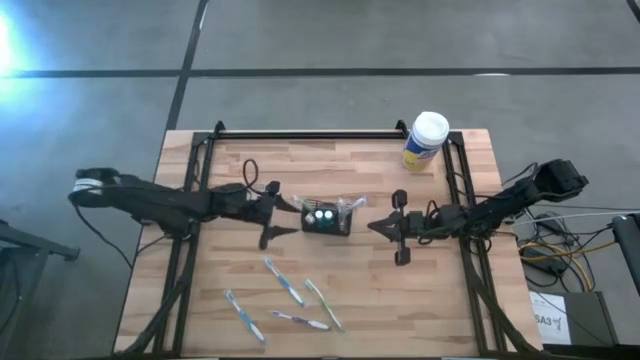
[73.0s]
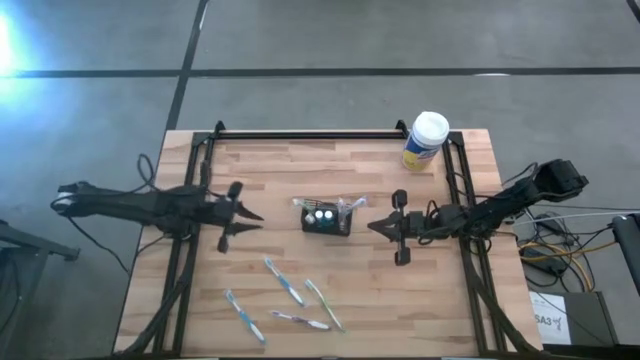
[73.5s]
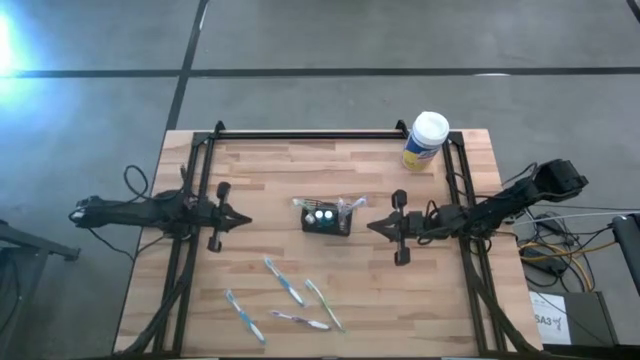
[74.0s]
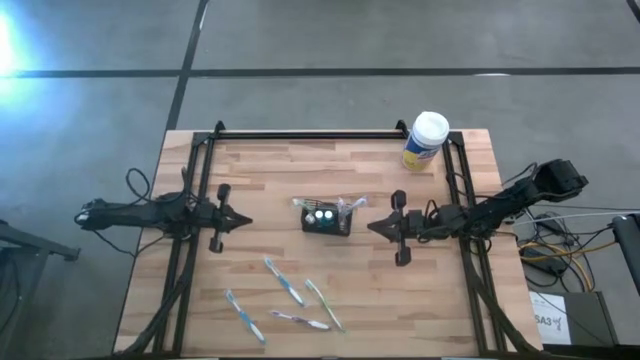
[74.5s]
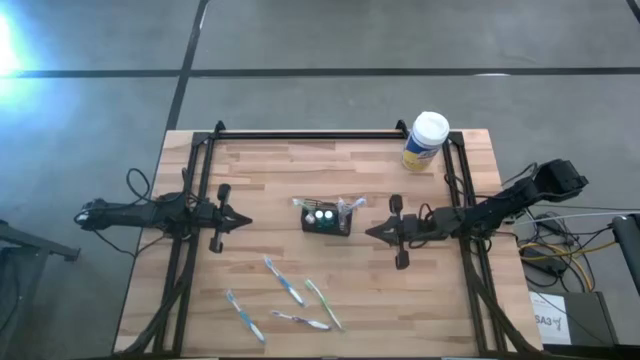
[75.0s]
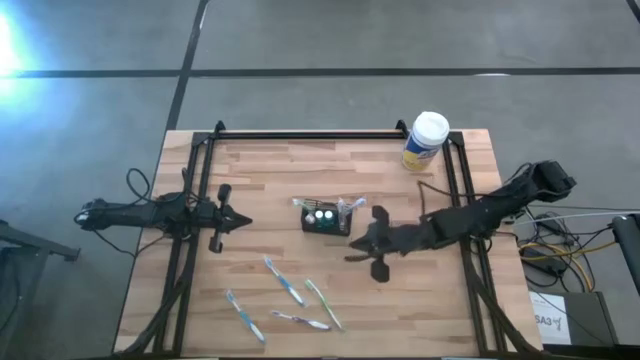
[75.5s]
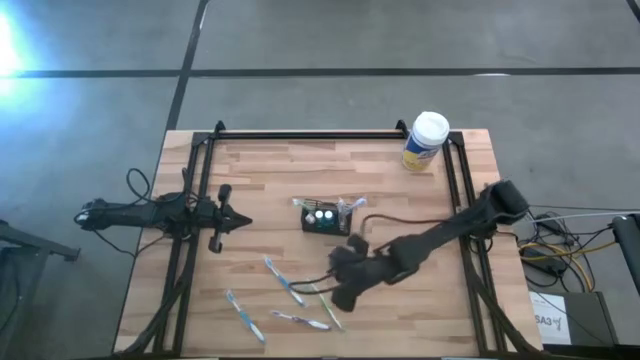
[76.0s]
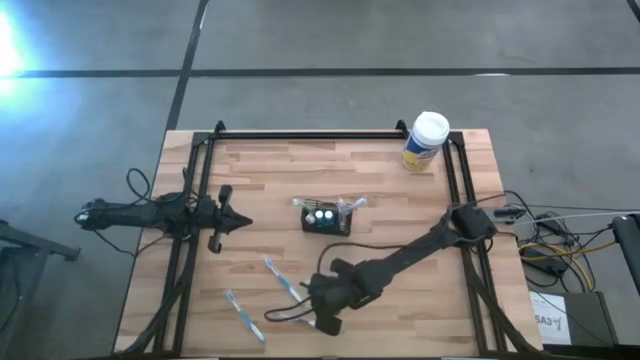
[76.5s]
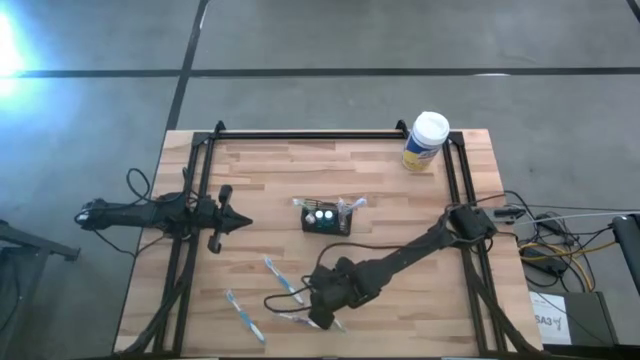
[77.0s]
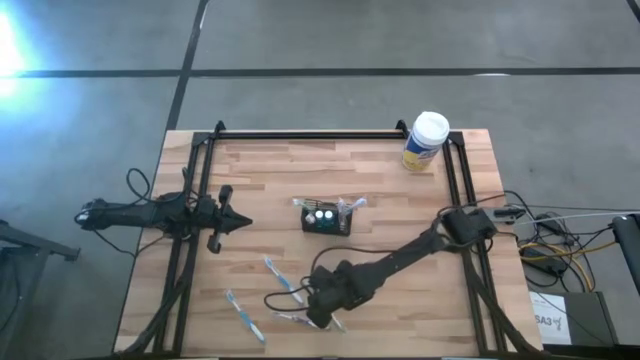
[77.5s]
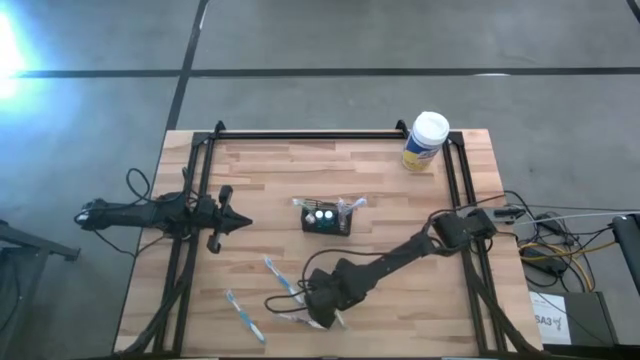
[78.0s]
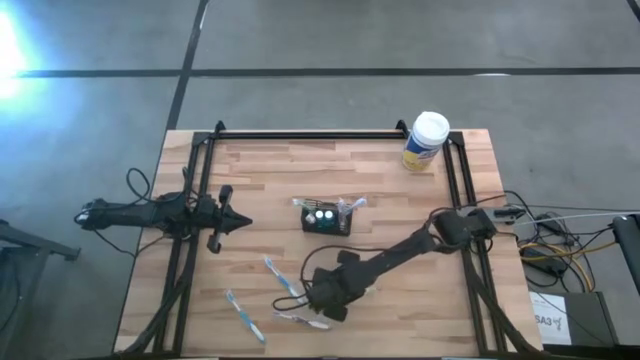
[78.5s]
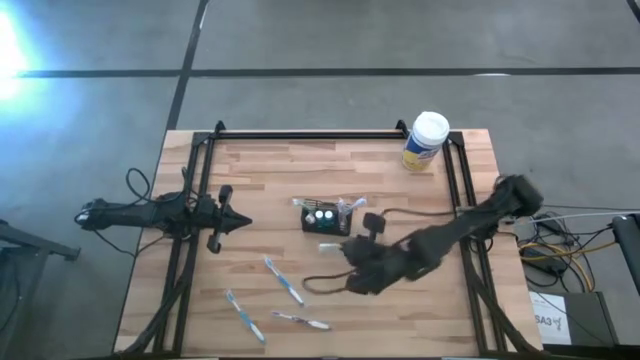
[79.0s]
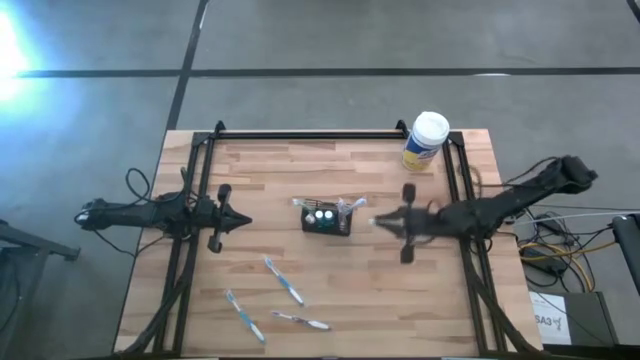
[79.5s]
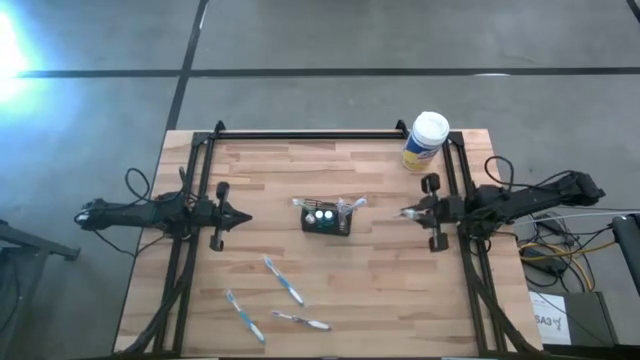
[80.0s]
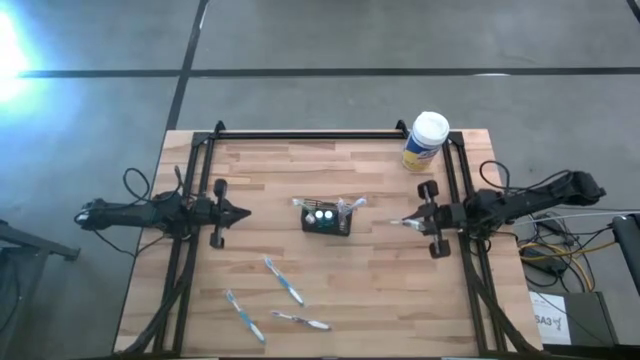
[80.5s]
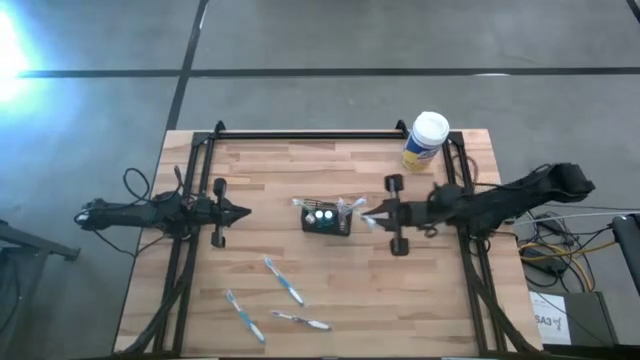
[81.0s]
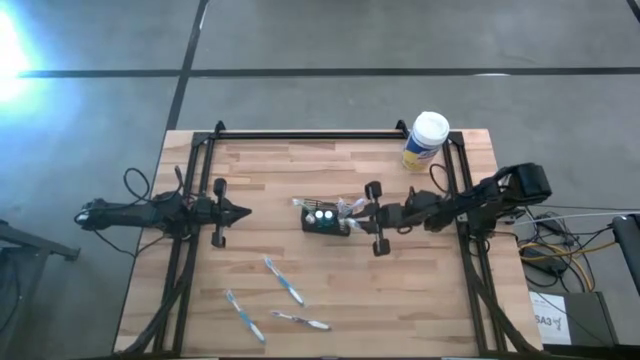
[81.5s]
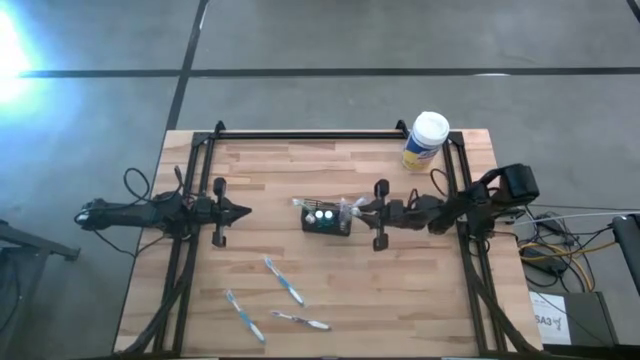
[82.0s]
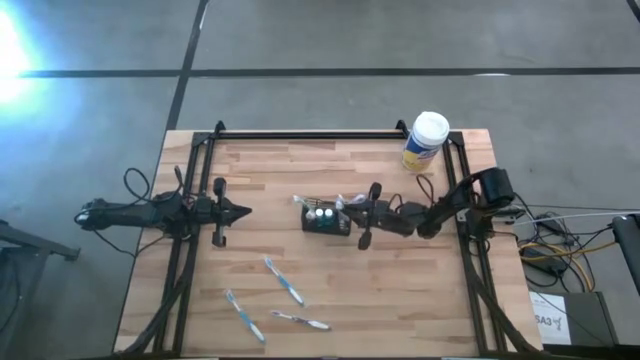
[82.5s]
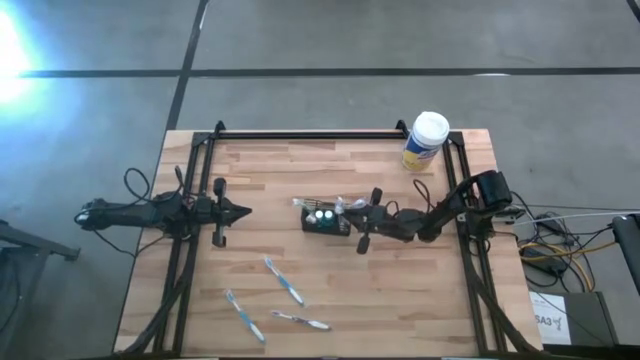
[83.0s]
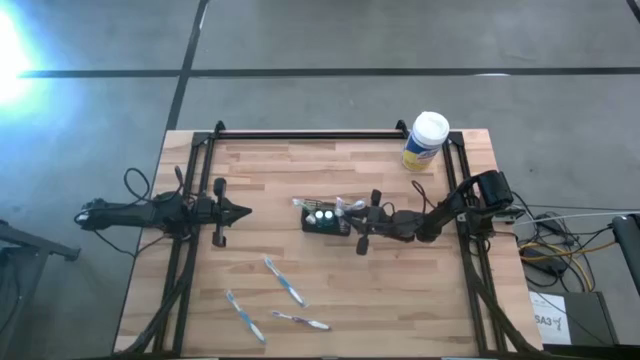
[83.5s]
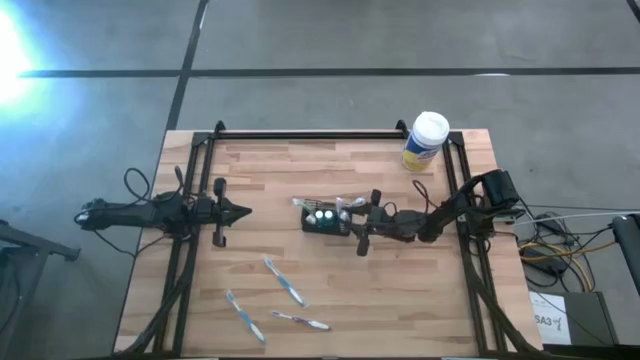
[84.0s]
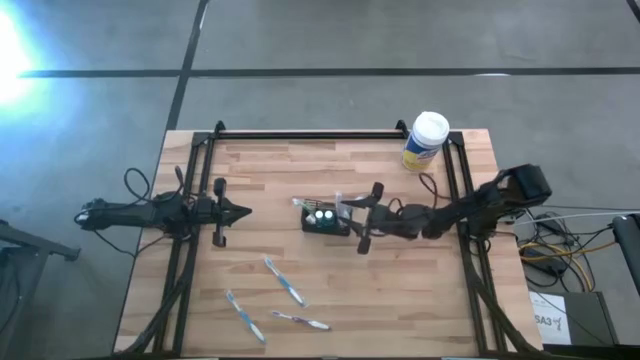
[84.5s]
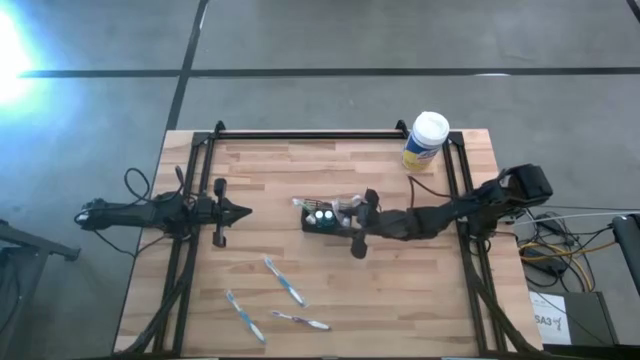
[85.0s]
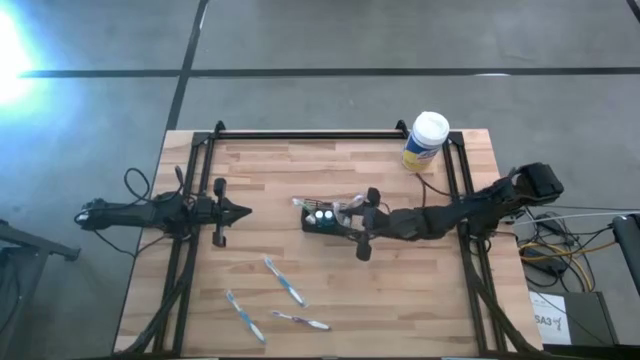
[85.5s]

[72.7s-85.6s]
Task: Pick & Place toothbrushing station
Put the green toothbrush into the black mesh organizer

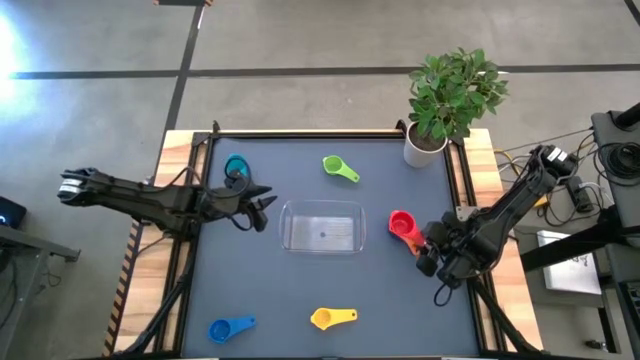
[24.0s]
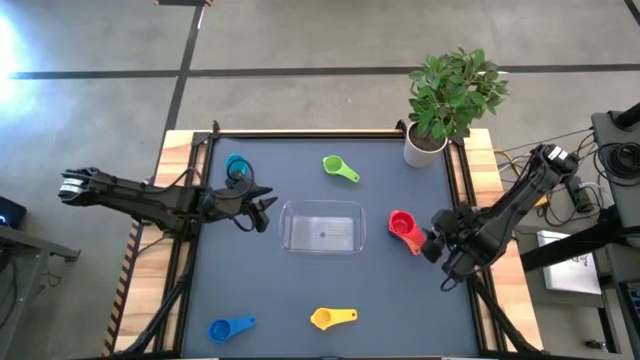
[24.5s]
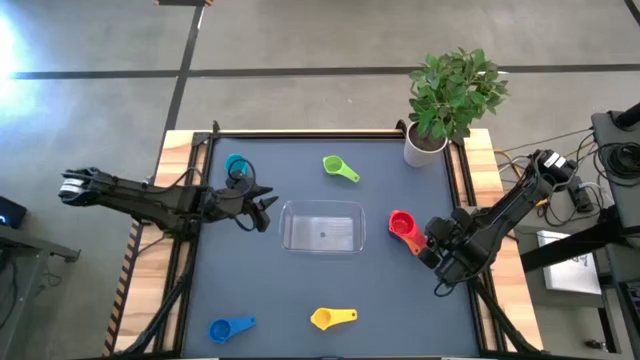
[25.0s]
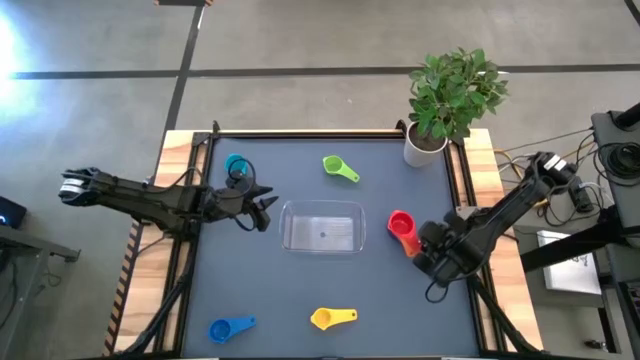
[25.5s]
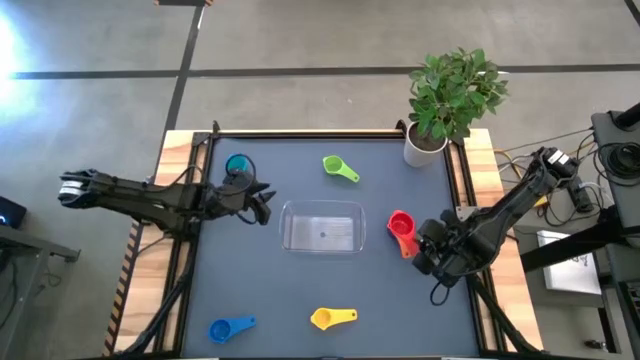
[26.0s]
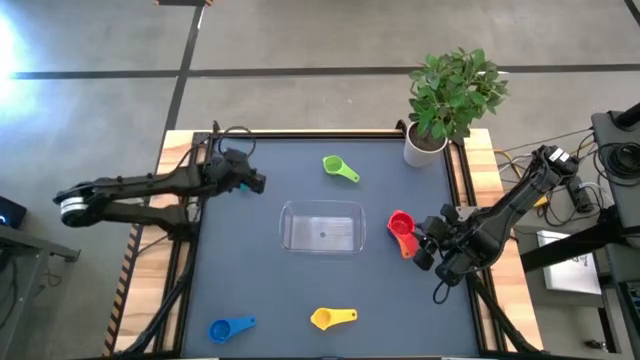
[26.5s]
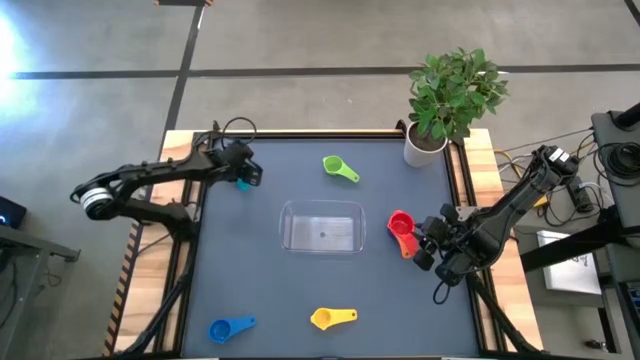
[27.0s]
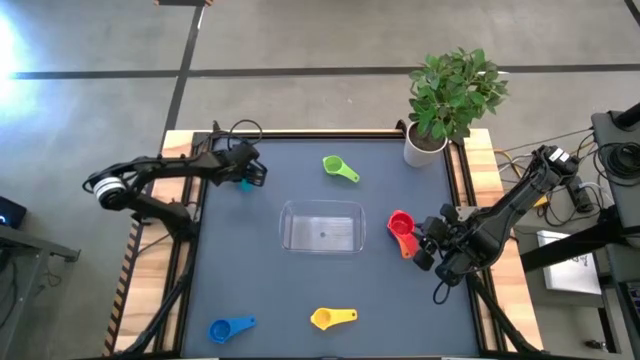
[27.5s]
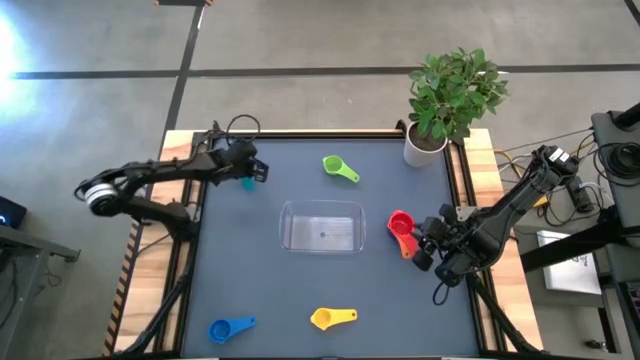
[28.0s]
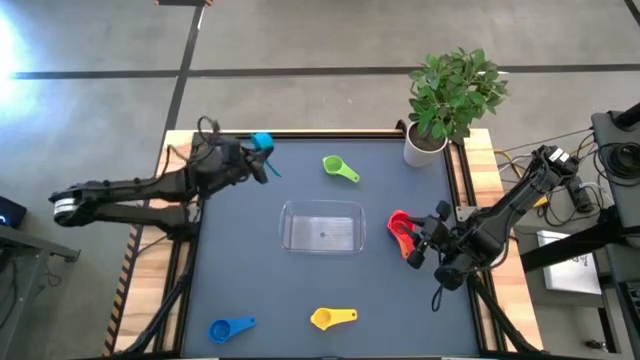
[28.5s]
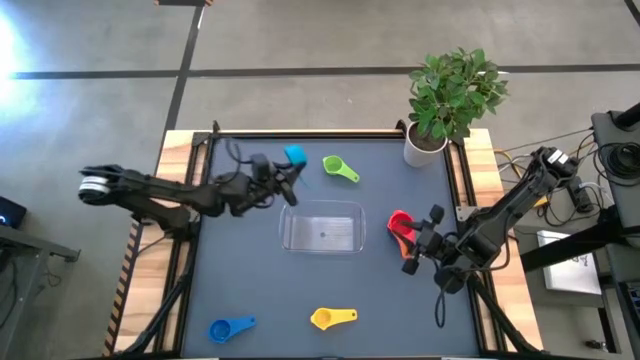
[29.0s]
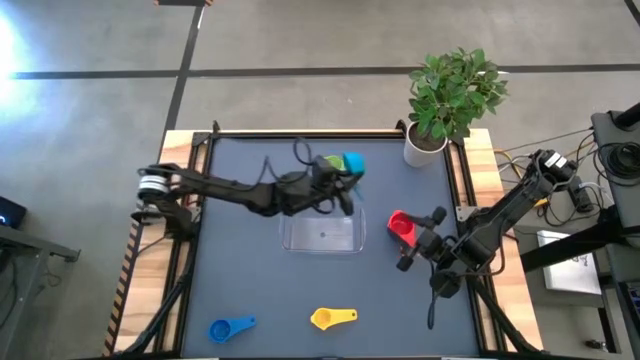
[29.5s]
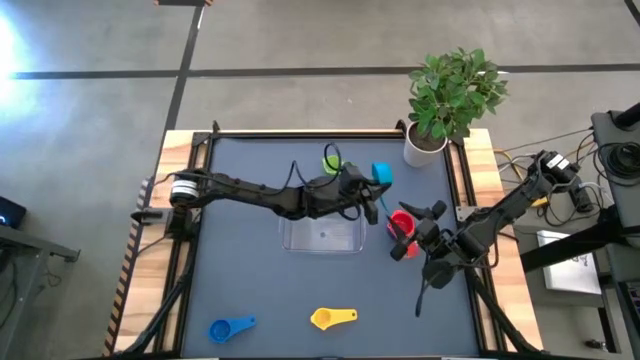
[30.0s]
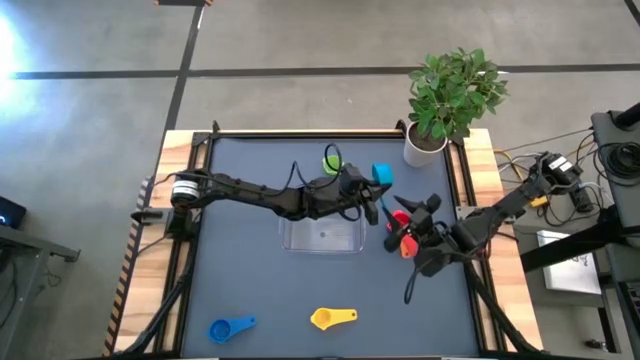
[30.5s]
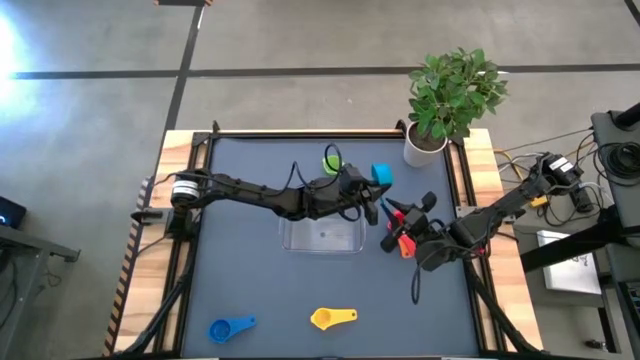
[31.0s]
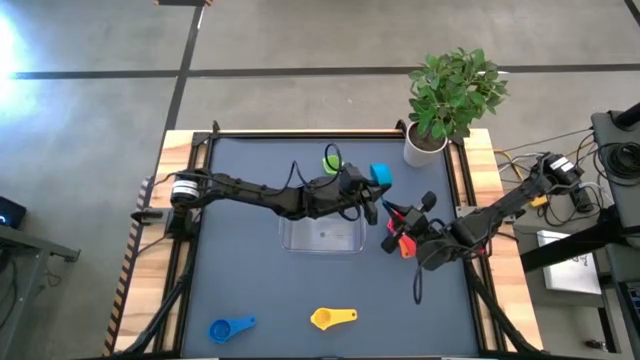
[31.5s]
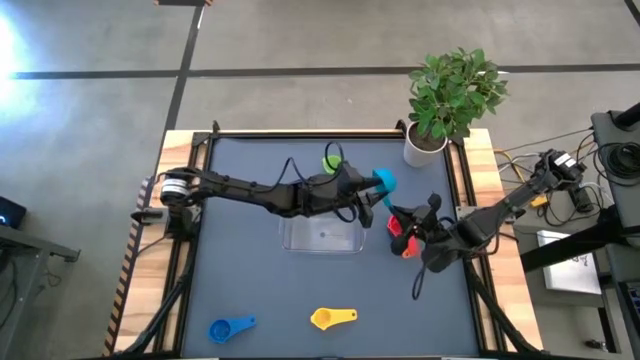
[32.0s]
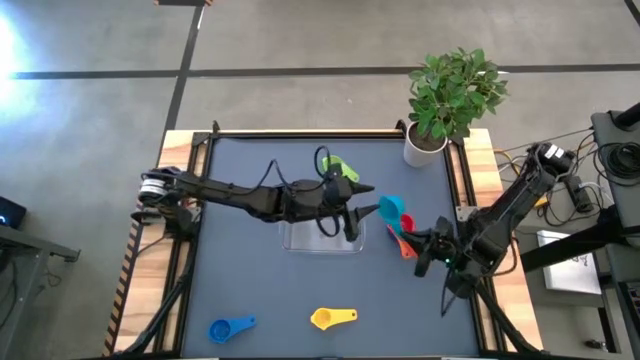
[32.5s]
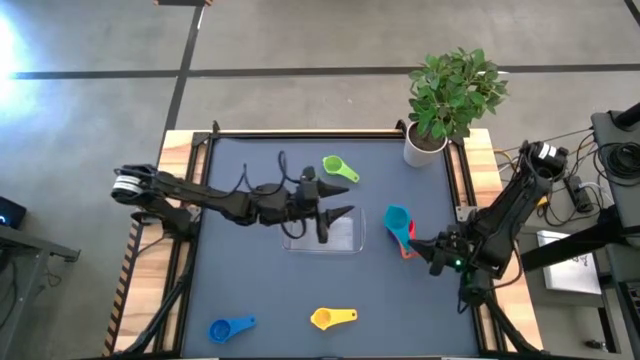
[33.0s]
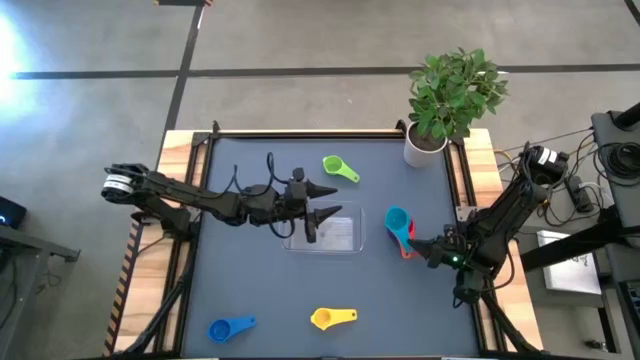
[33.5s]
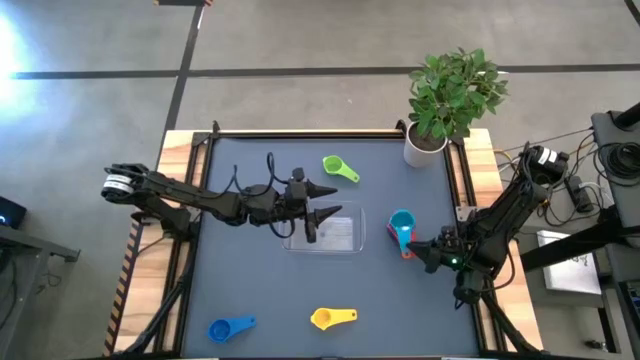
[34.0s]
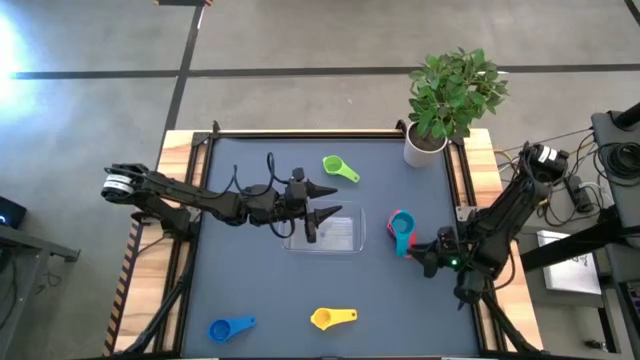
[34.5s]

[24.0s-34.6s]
Task: Nest measuring cups in basket
Stack the light blue measuring cup on top of the red measuring cup
